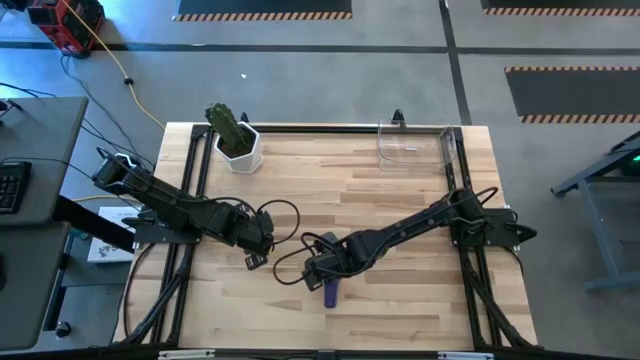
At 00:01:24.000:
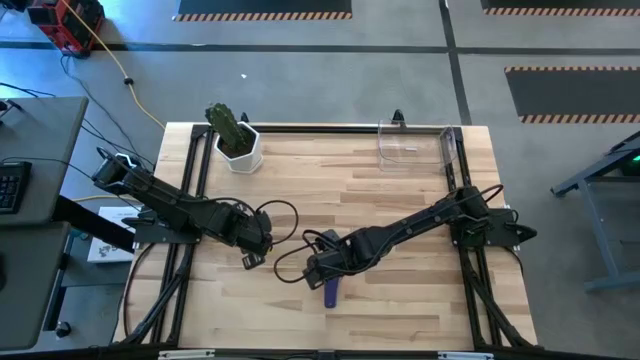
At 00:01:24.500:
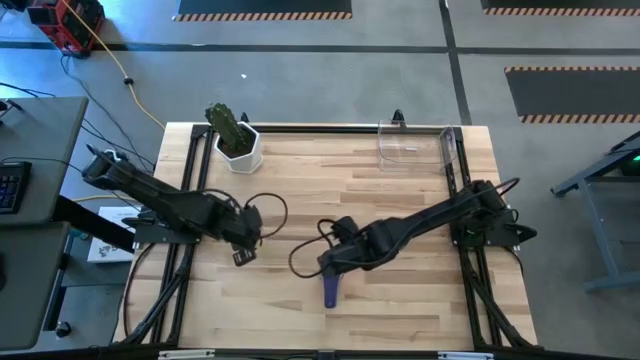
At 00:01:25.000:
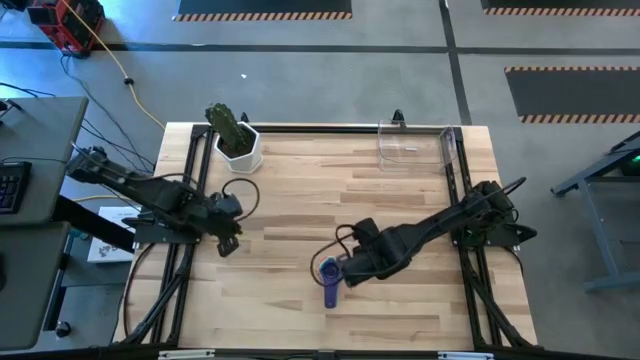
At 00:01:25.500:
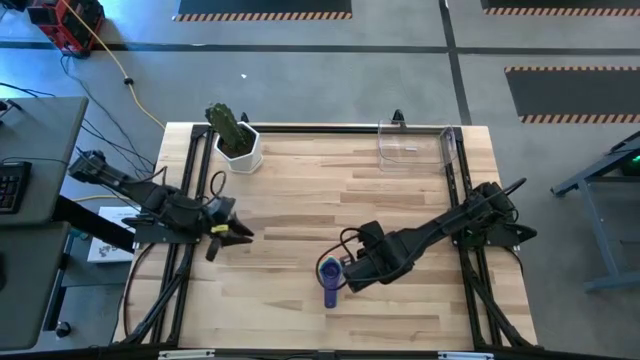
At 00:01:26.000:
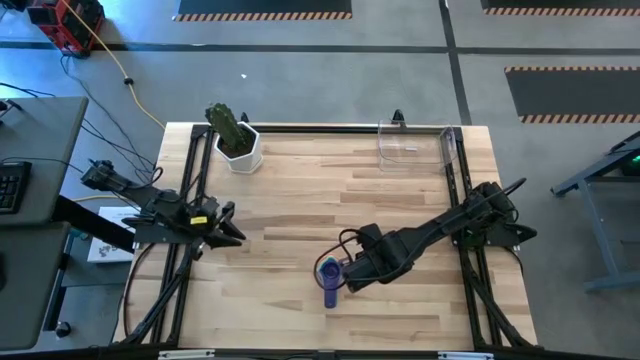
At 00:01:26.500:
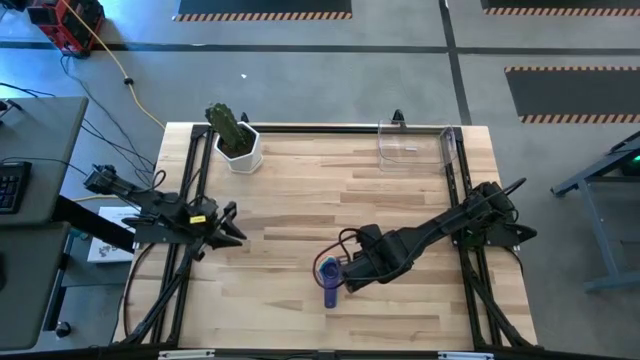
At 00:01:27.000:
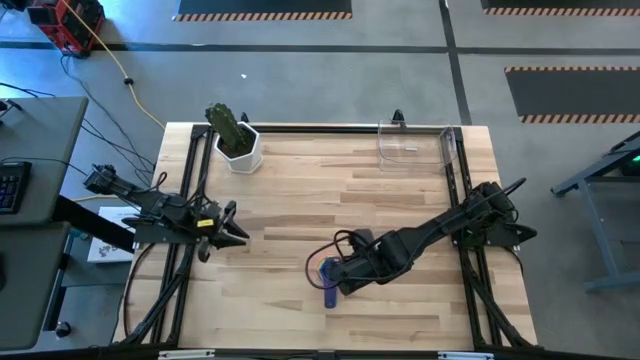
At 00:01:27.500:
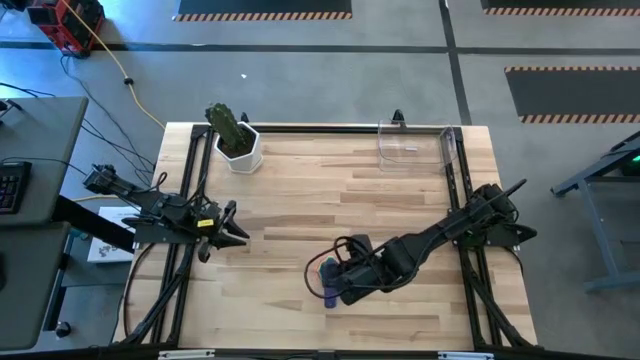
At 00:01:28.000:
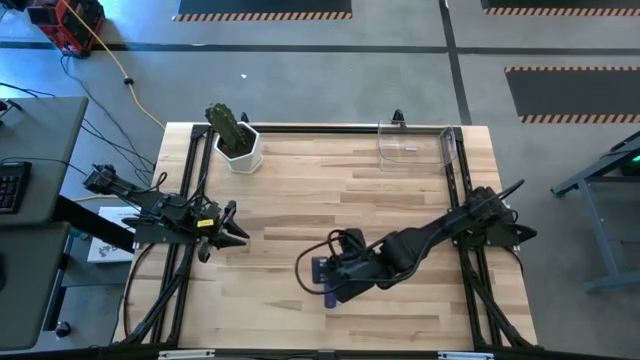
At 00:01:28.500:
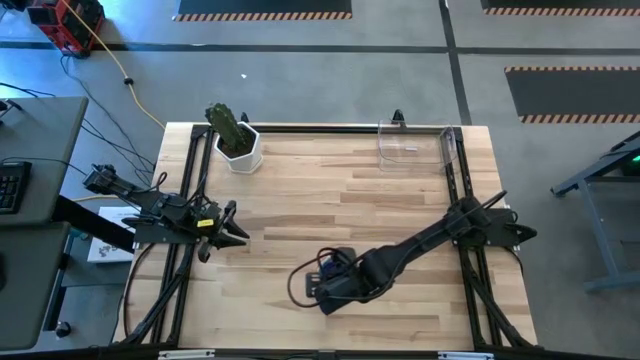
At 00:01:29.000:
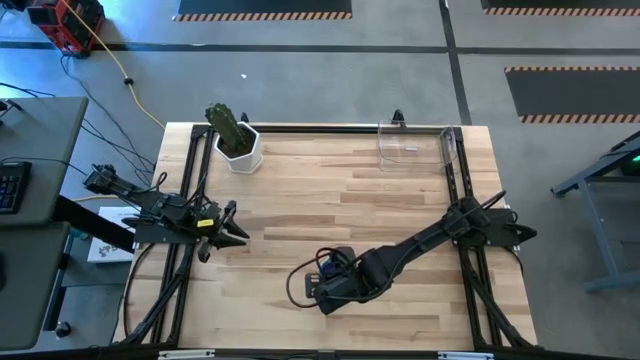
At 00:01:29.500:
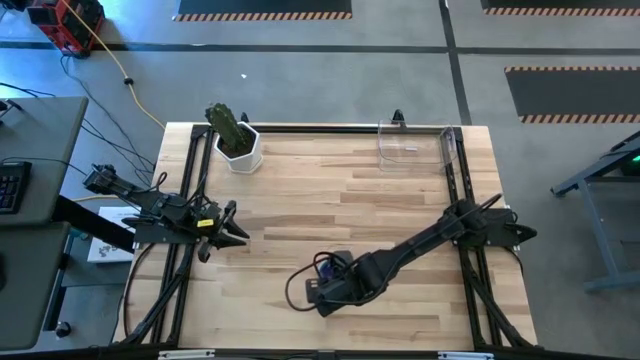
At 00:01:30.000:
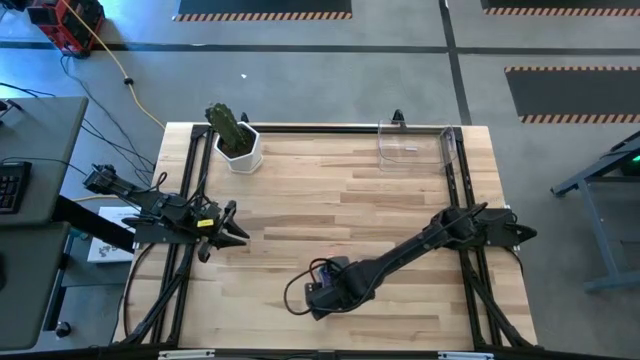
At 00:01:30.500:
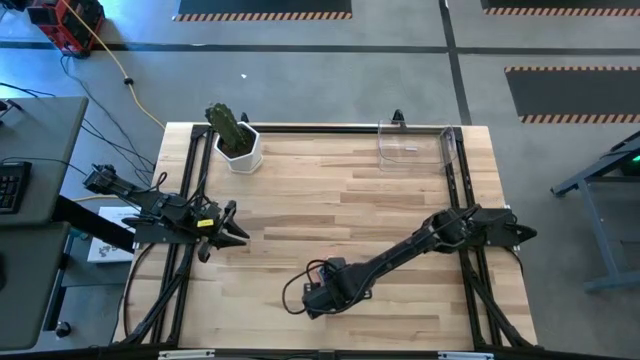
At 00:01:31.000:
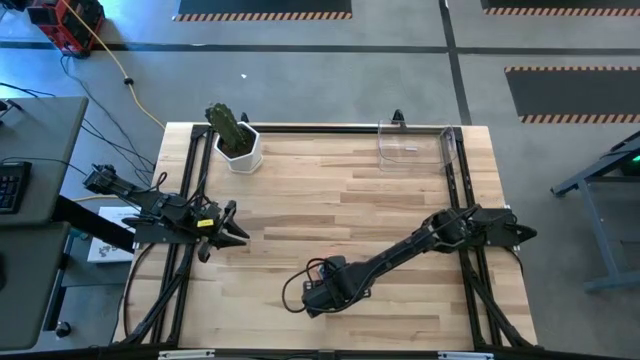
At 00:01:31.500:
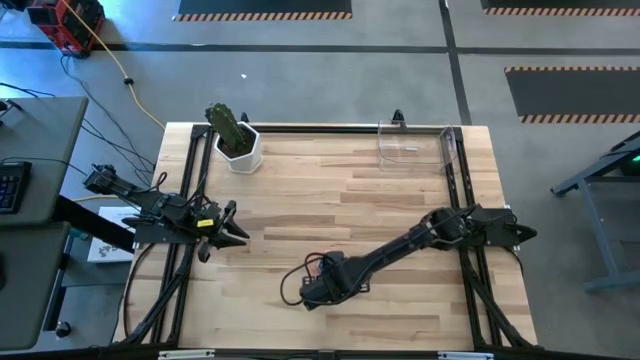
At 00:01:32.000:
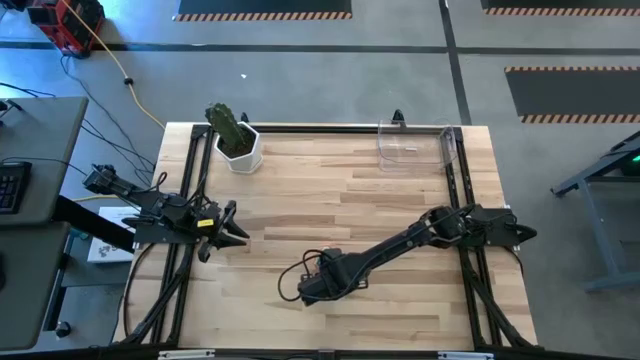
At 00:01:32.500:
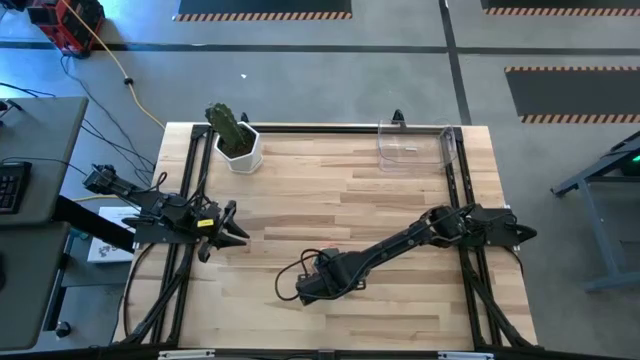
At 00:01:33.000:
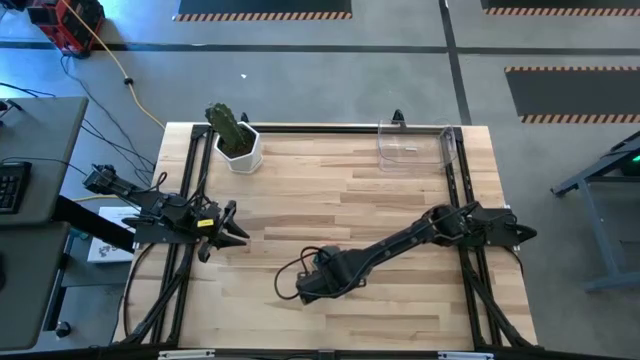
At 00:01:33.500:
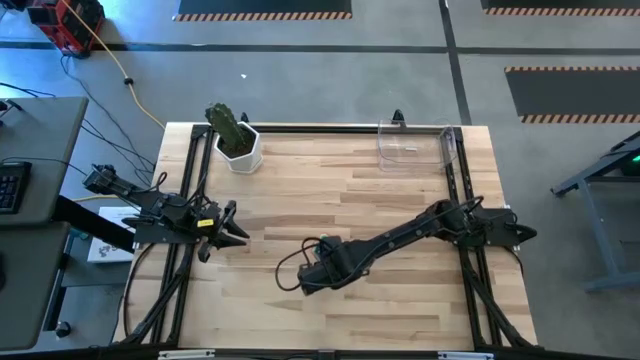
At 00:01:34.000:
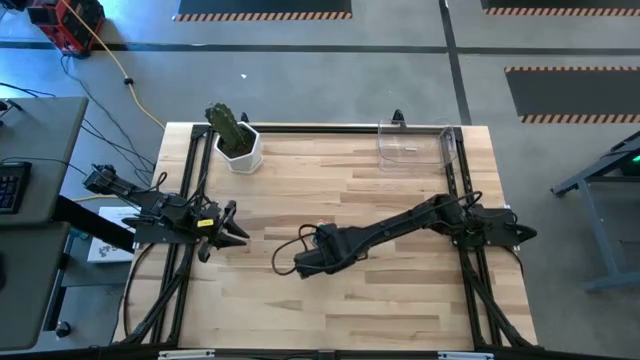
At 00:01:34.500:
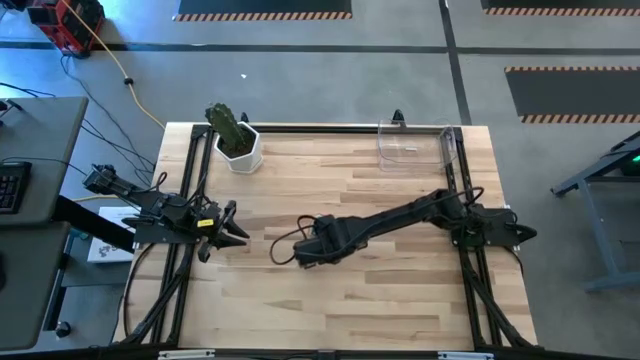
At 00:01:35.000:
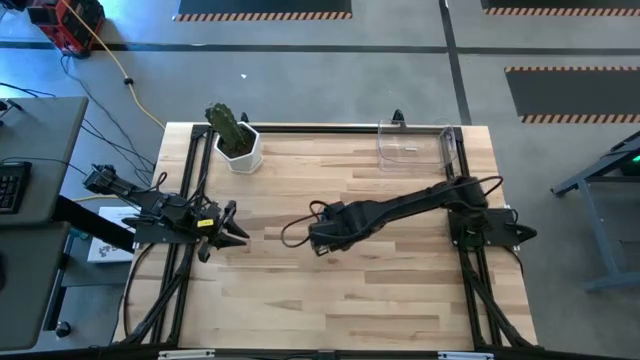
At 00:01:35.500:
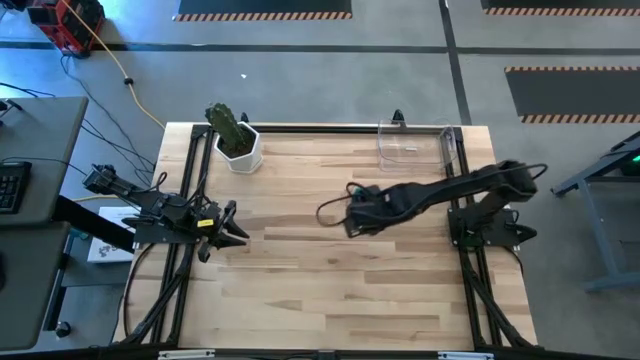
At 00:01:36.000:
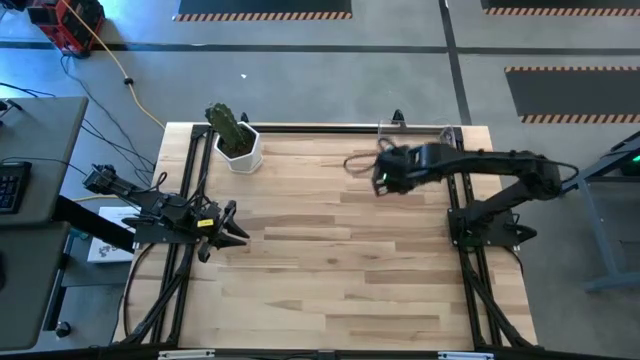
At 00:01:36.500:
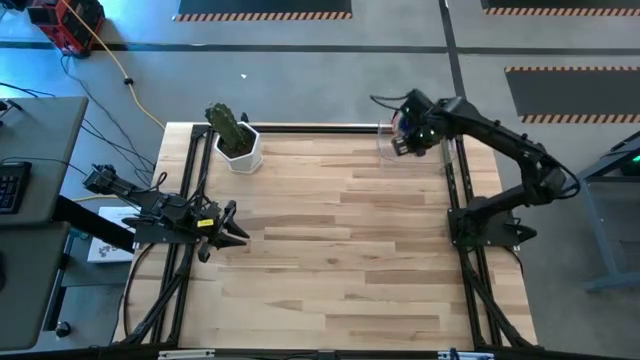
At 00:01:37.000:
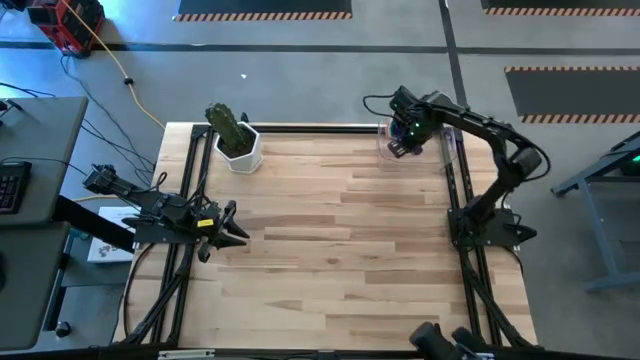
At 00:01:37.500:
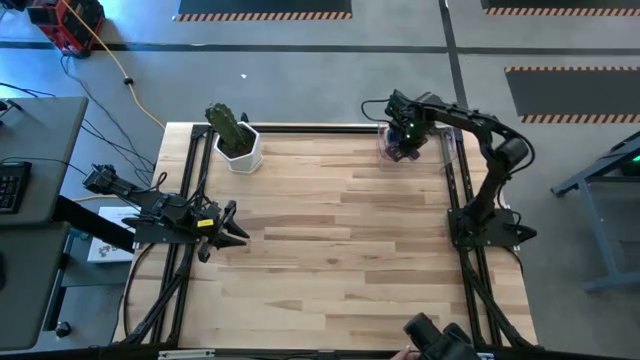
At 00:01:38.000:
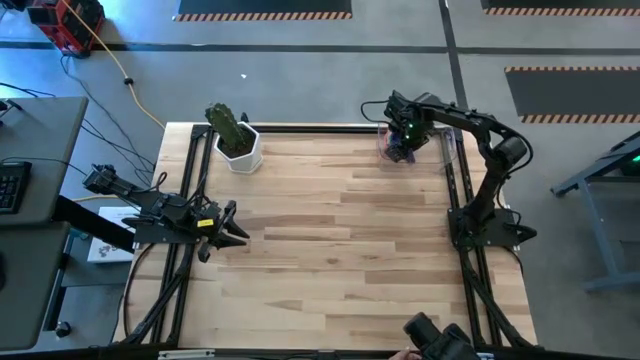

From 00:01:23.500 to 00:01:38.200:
Task: Nest measuring cups in basket
Put the nested measuring cups into the transparent bin

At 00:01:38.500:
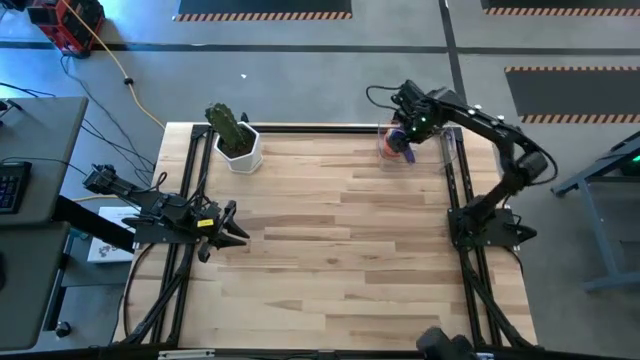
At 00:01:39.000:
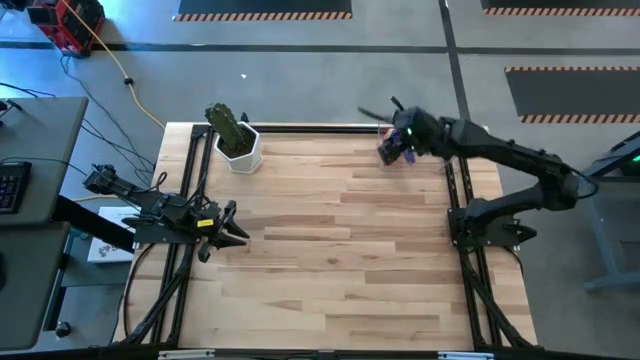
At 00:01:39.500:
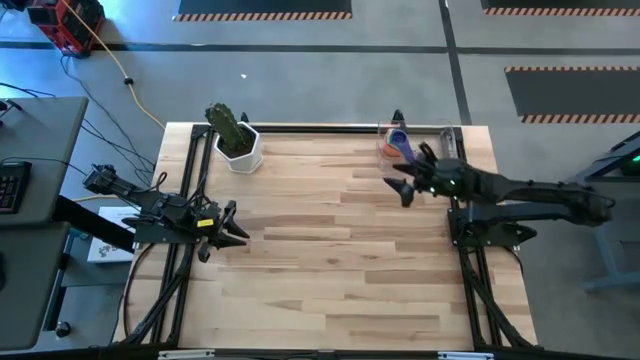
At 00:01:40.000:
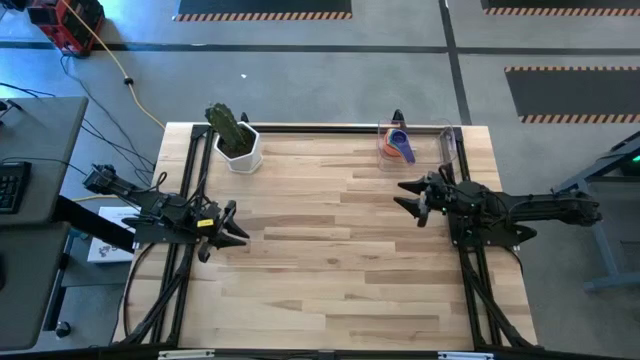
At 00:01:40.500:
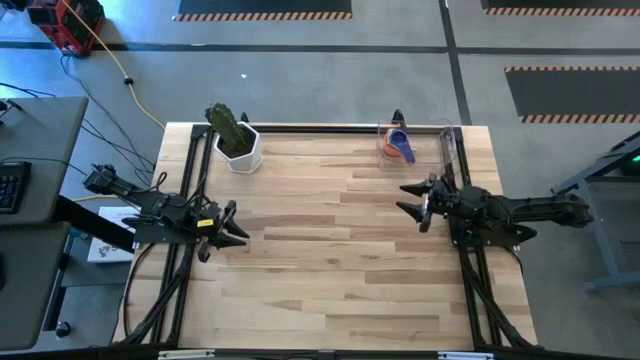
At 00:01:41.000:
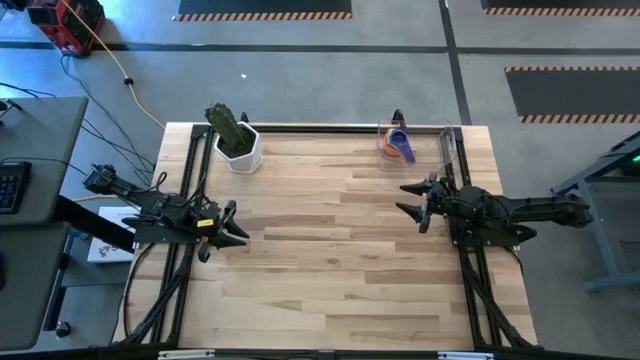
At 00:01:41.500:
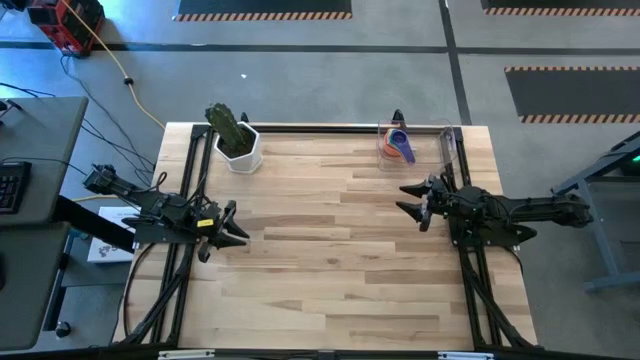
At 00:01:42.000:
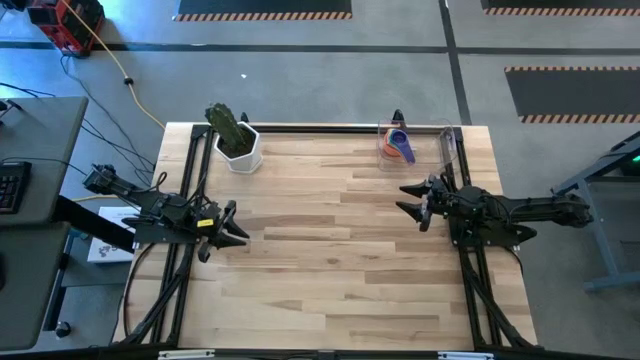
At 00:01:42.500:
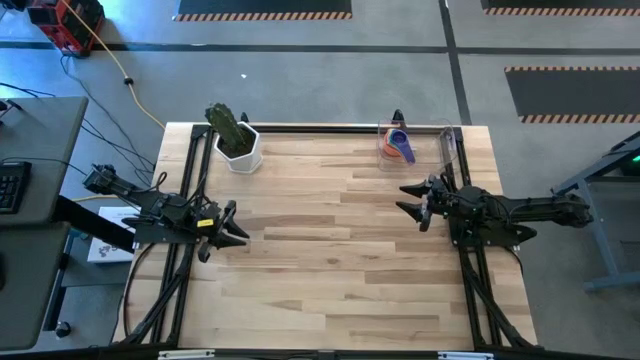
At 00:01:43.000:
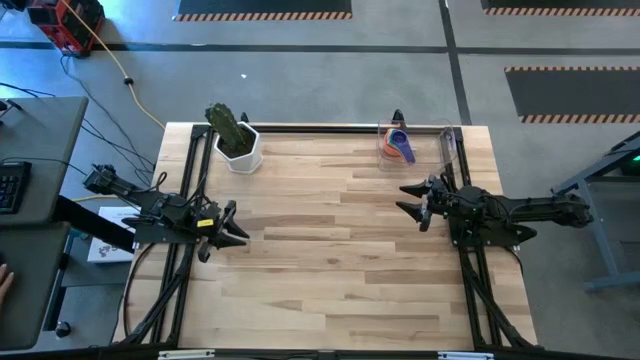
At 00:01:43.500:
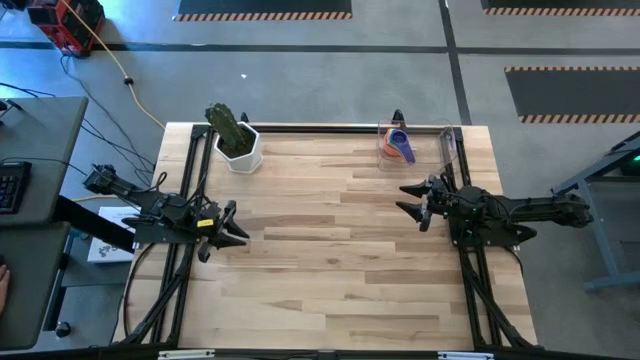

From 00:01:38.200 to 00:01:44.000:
Return to Home Position
